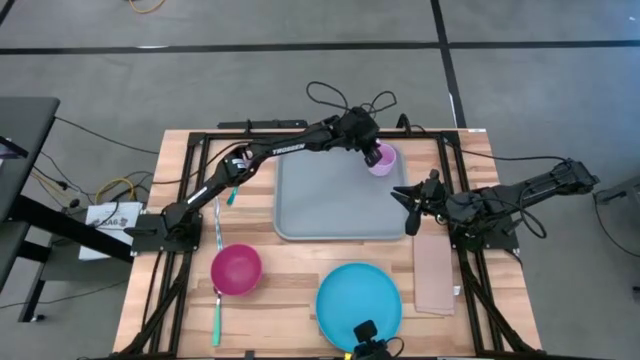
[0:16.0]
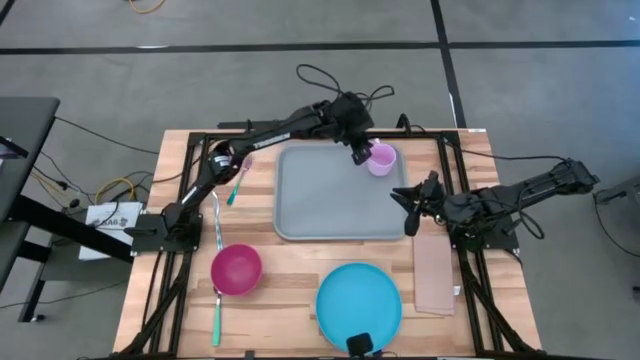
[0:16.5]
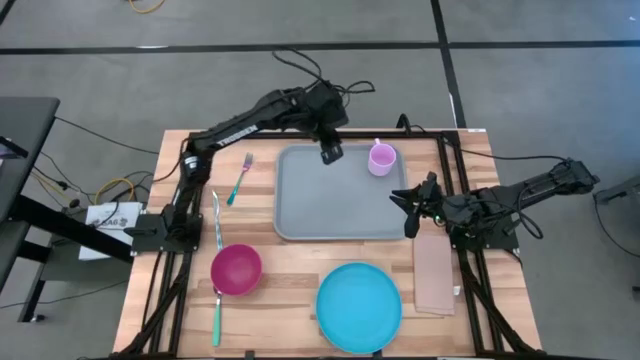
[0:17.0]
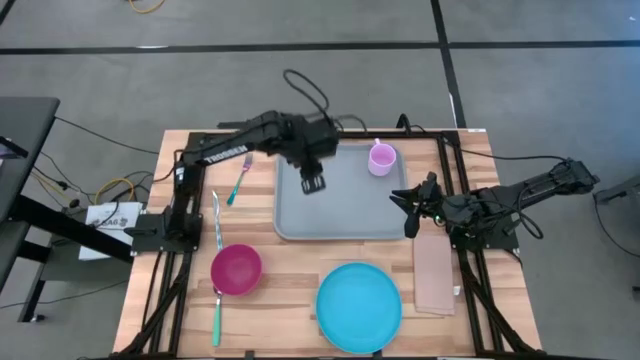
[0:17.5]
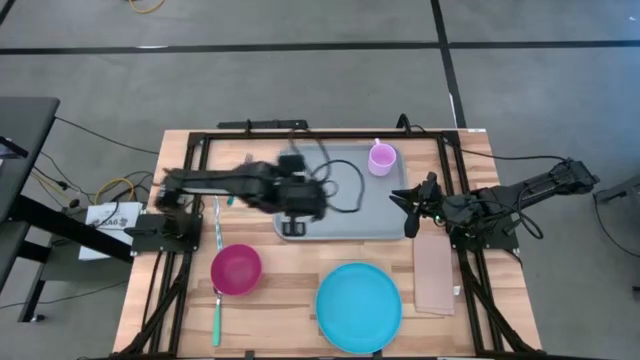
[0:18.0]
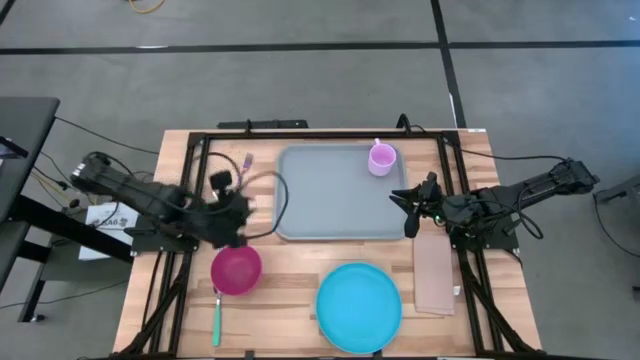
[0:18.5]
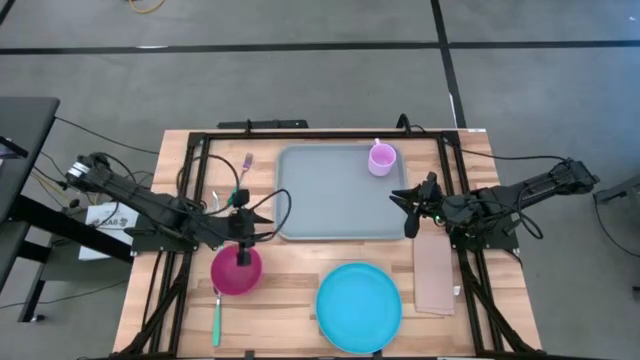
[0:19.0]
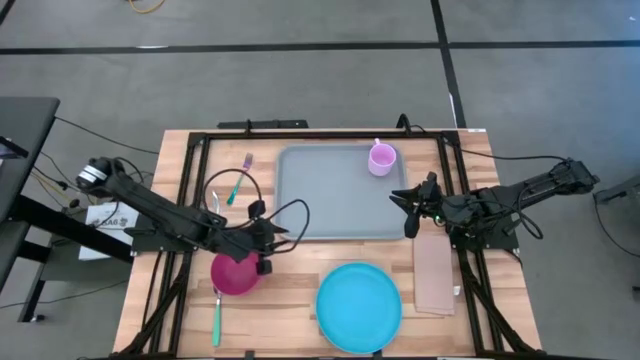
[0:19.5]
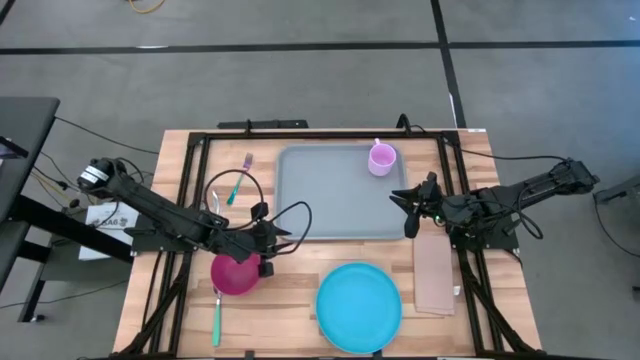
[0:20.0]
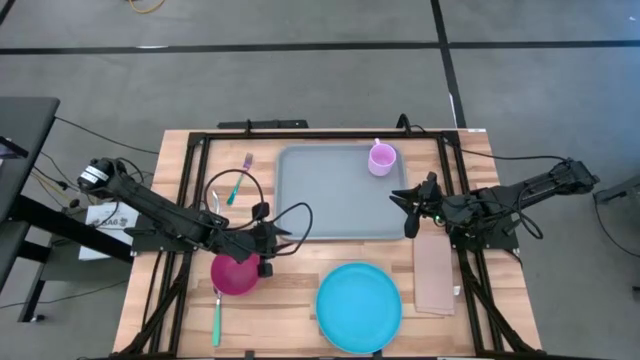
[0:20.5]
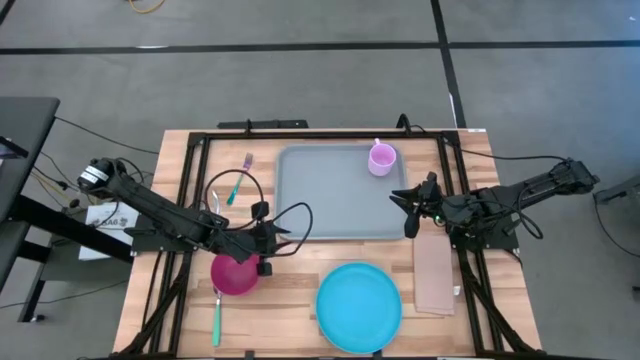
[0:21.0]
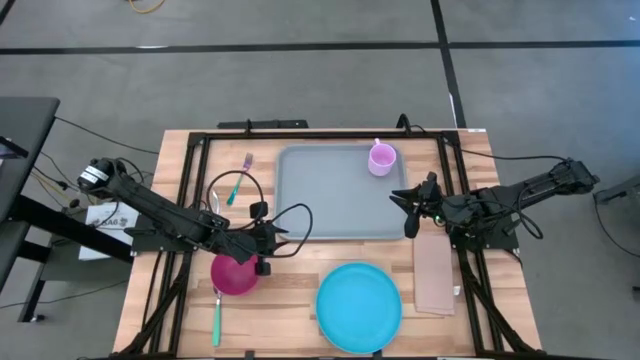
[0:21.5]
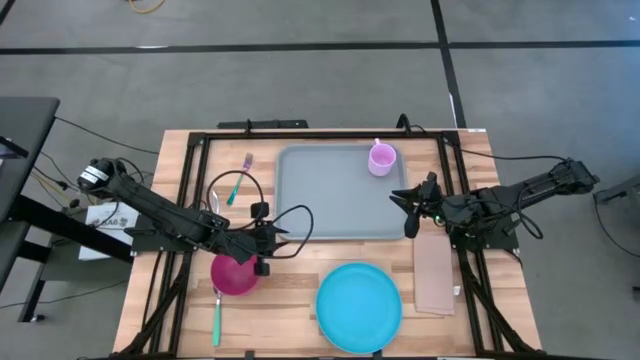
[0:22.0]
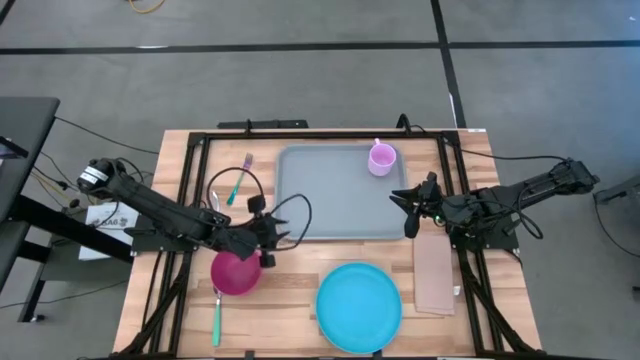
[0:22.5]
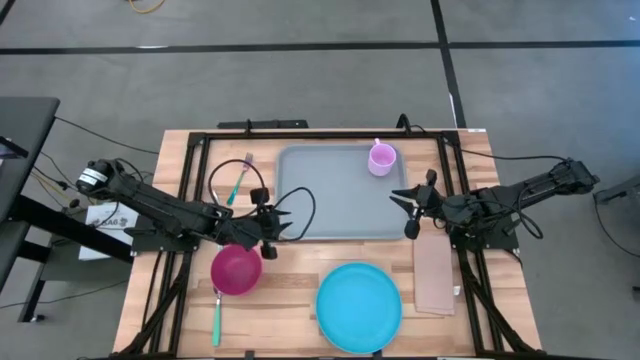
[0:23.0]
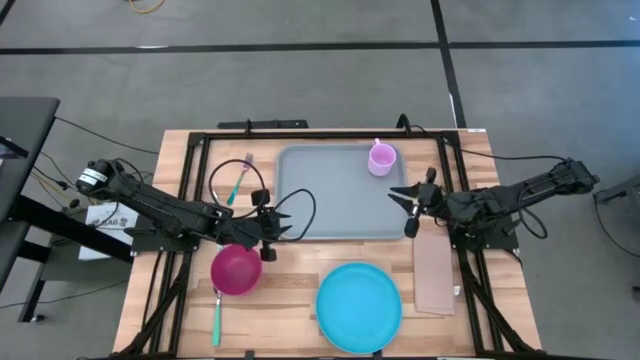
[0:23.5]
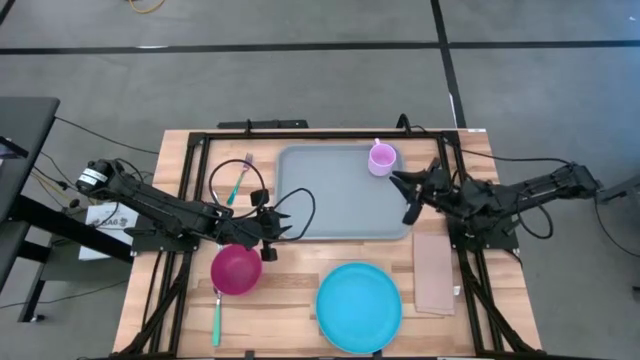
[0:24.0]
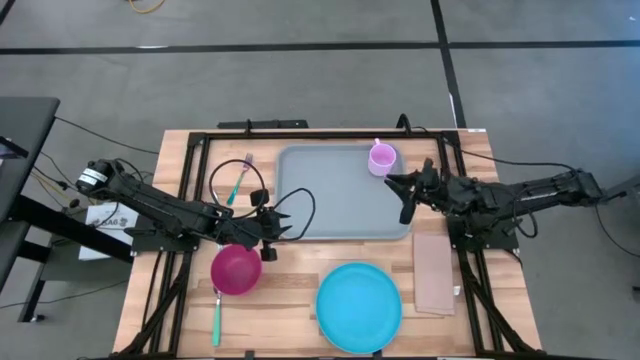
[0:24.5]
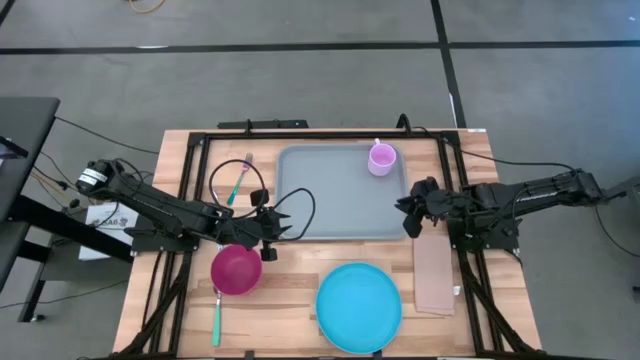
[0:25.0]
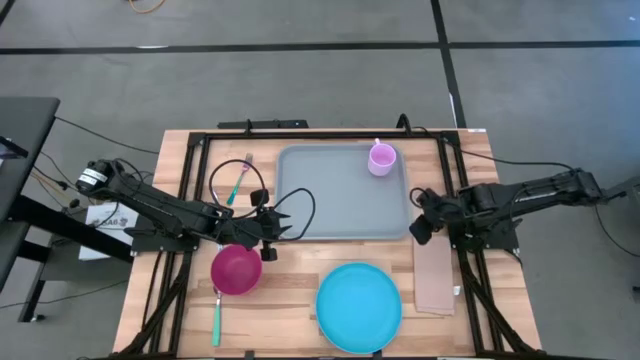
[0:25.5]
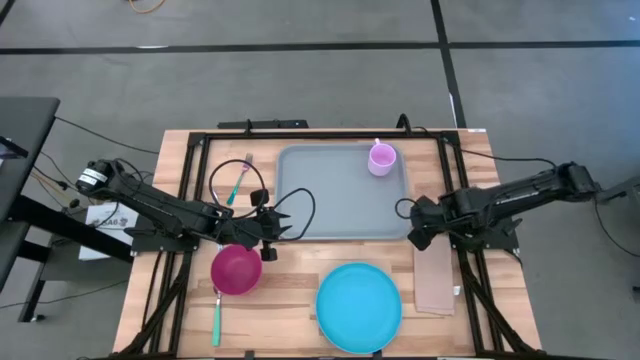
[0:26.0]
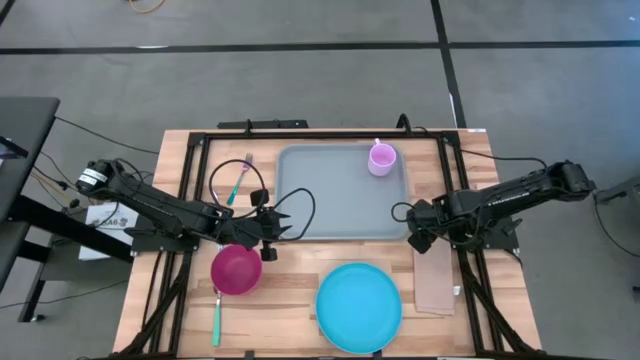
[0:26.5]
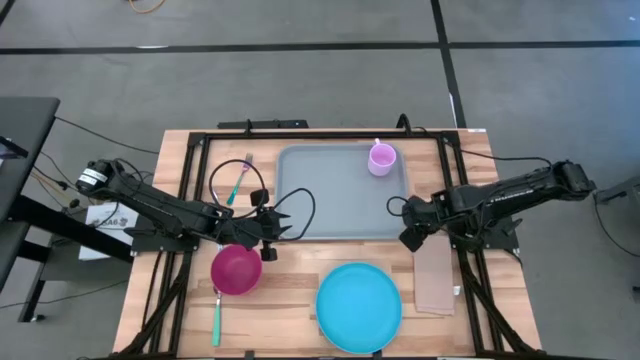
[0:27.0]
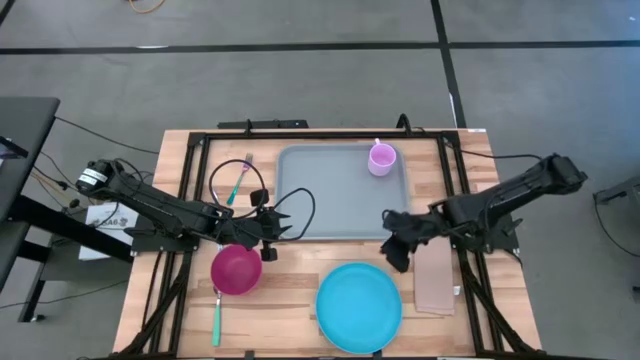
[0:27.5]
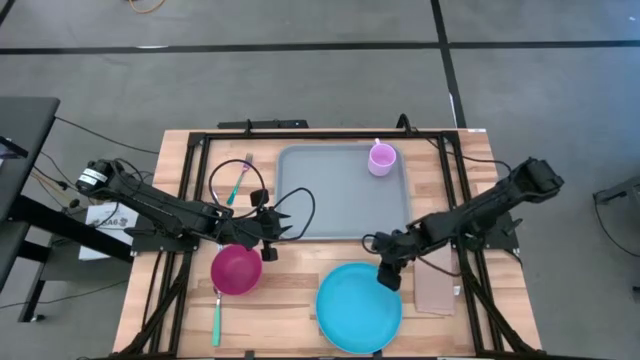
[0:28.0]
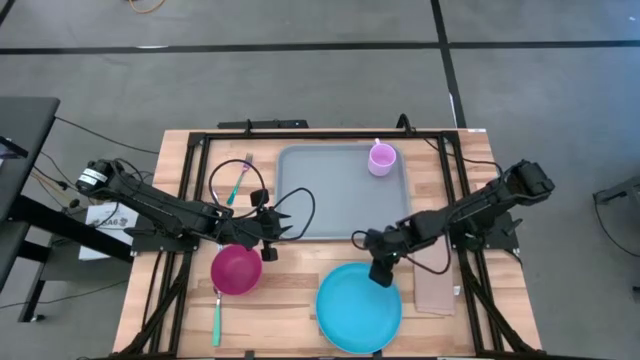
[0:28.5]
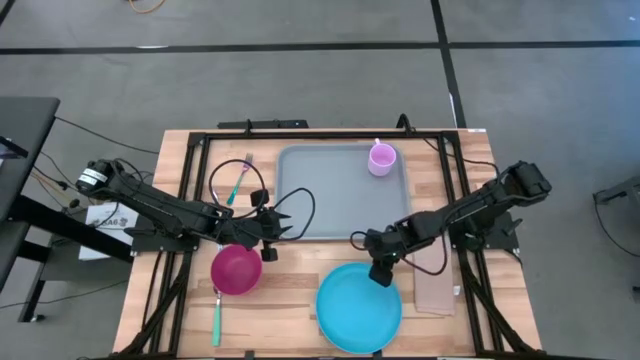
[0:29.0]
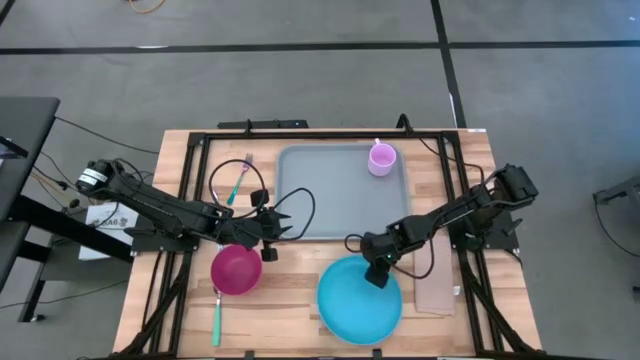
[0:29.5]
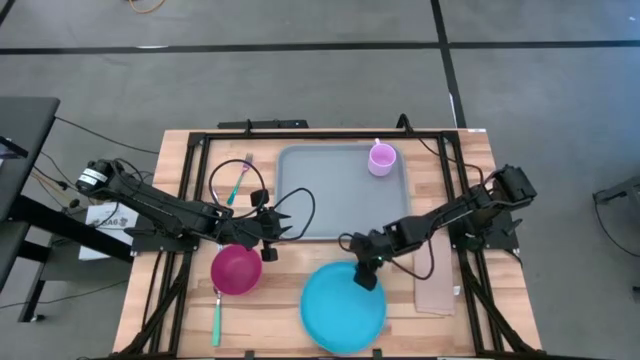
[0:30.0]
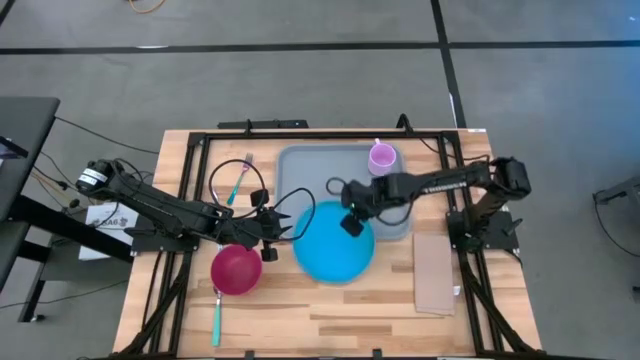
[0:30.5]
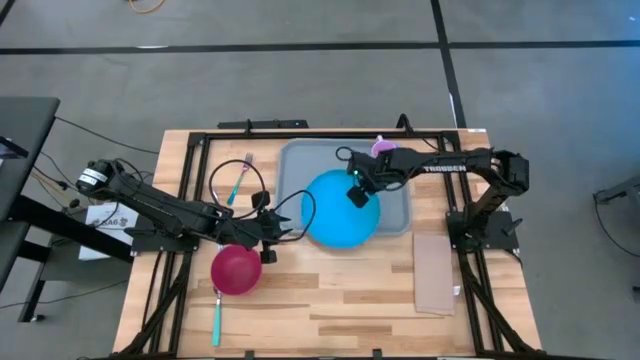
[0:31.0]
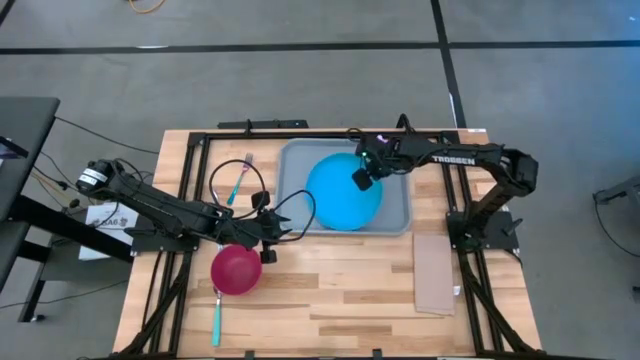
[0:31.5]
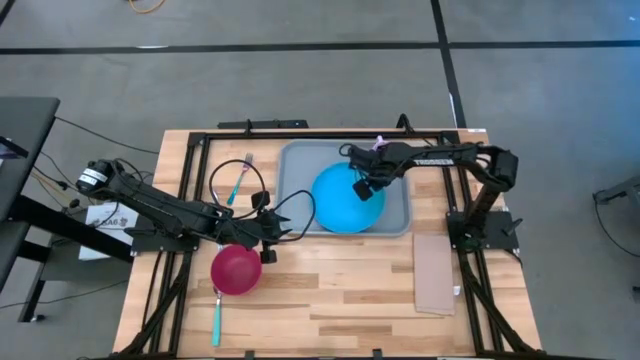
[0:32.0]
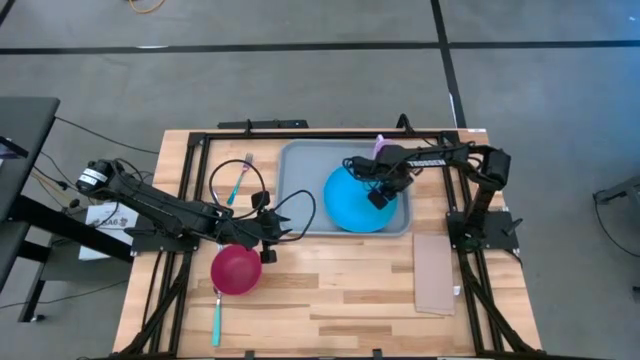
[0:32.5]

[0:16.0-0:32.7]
Task: Set up tray
Put the blue plate under the pink mug on the gray tray

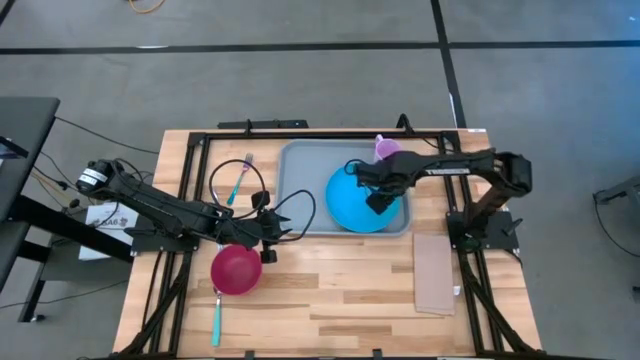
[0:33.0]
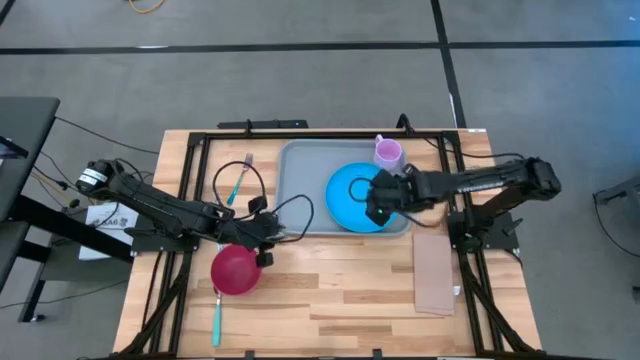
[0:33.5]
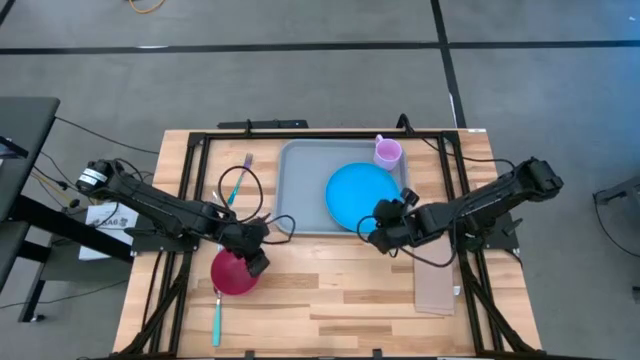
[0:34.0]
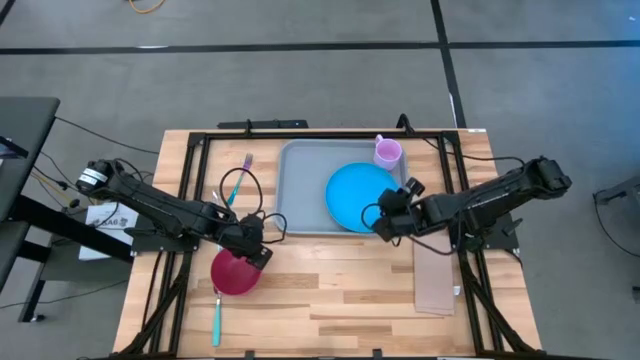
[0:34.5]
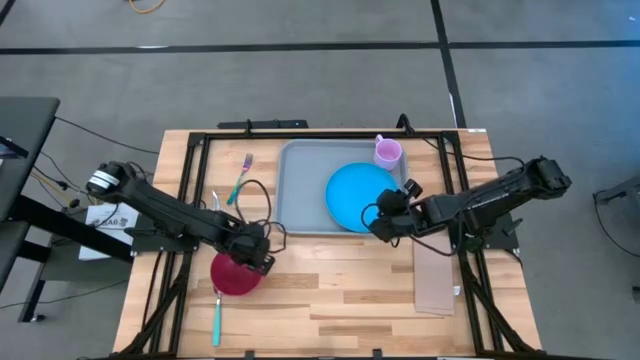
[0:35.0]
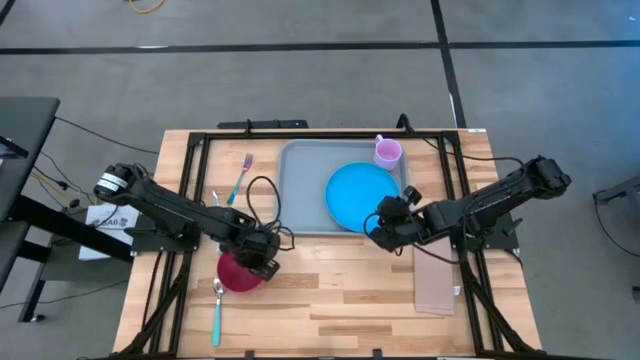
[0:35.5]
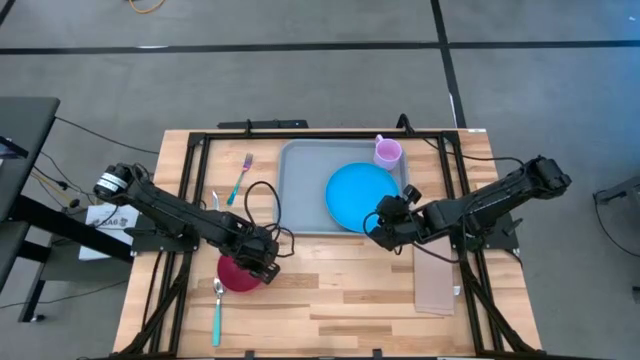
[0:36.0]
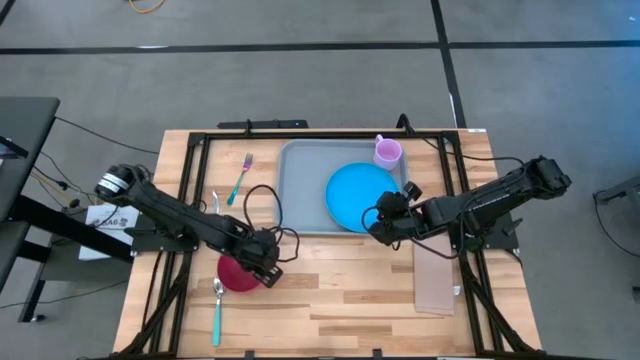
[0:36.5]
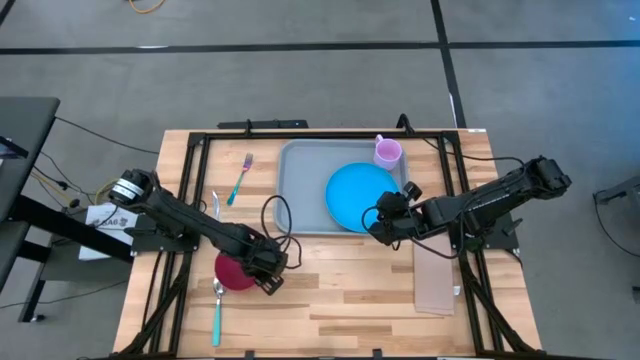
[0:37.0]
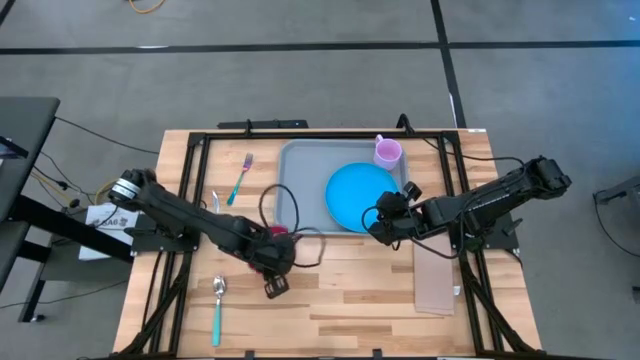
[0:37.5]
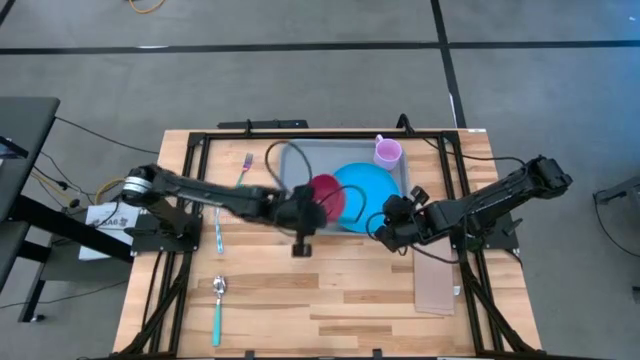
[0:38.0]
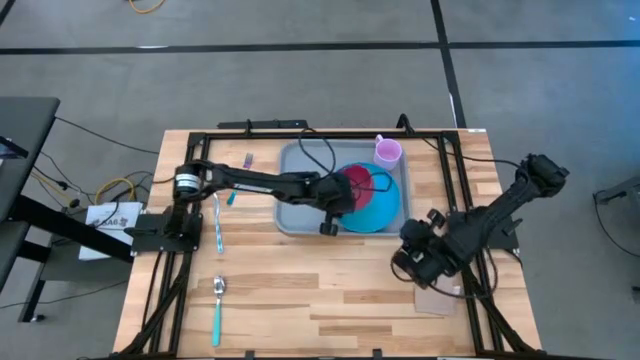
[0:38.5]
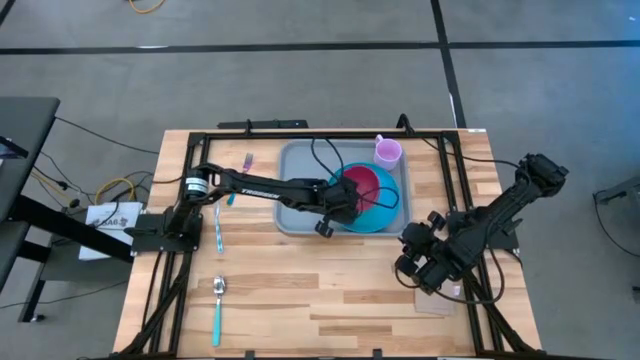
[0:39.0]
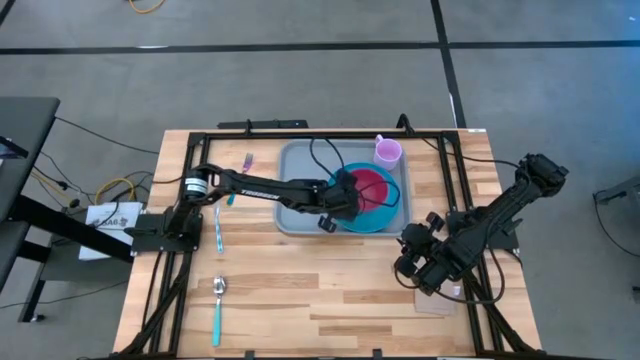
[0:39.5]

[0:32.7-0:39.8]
Put the red bowl on the blue plate
